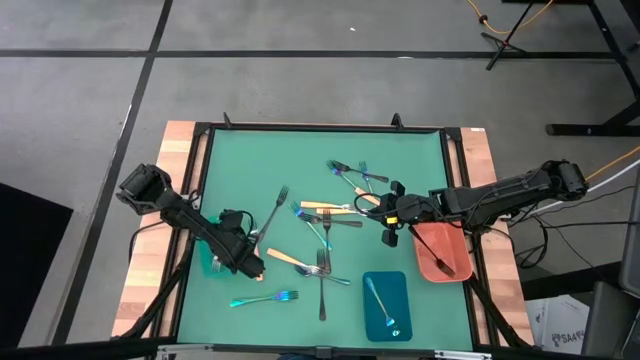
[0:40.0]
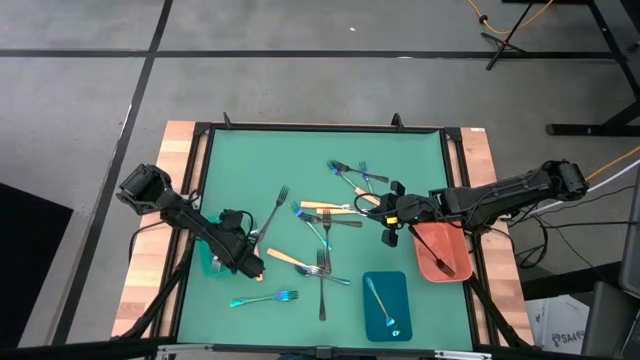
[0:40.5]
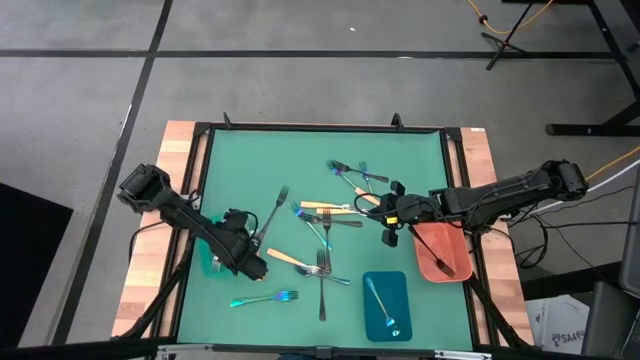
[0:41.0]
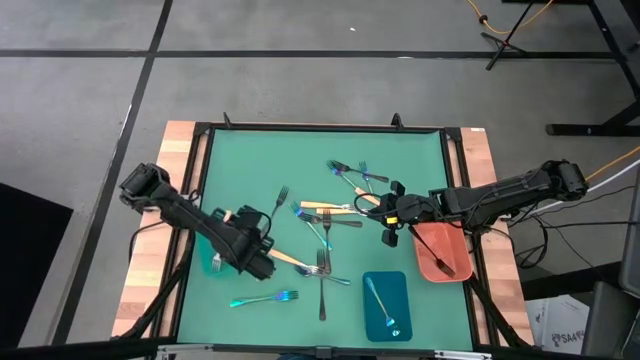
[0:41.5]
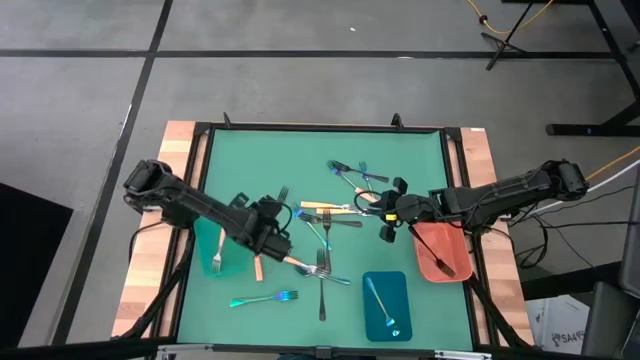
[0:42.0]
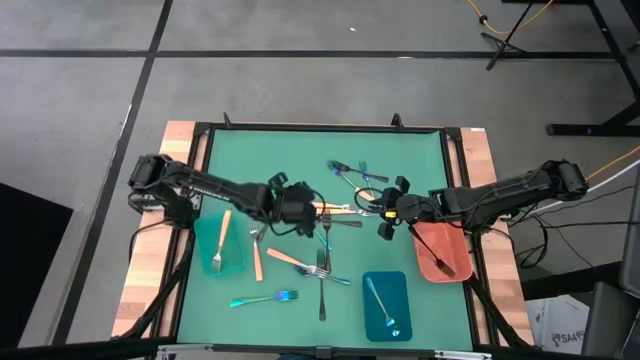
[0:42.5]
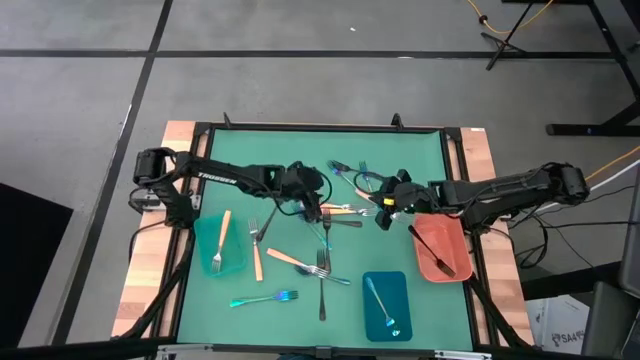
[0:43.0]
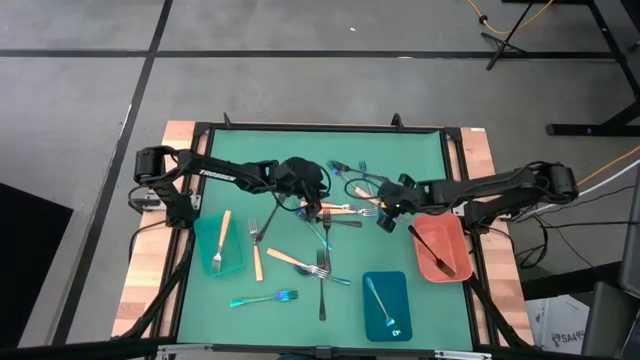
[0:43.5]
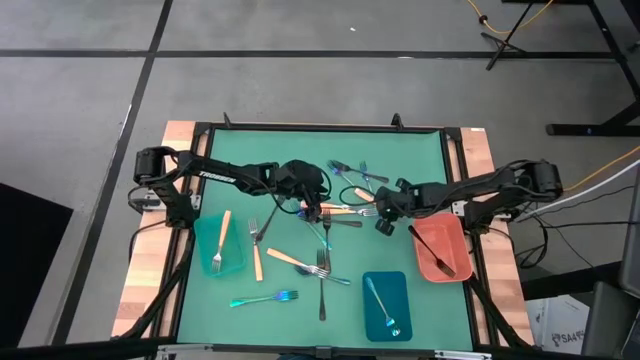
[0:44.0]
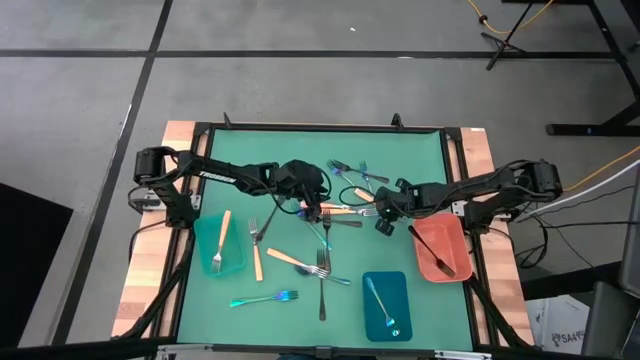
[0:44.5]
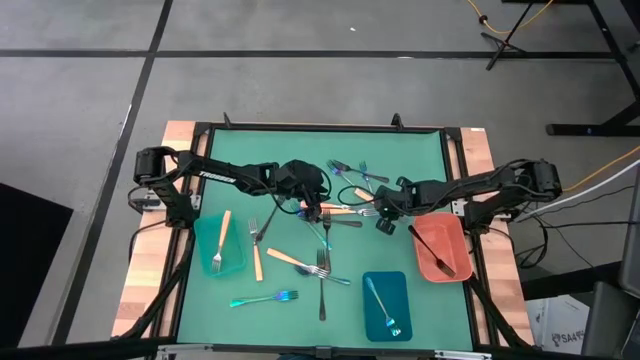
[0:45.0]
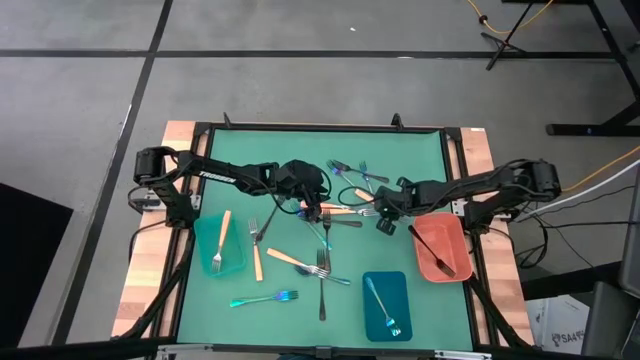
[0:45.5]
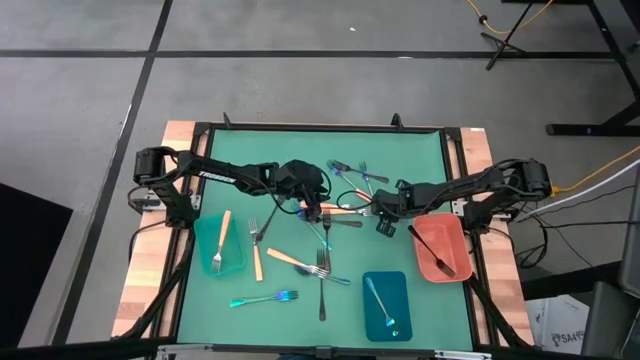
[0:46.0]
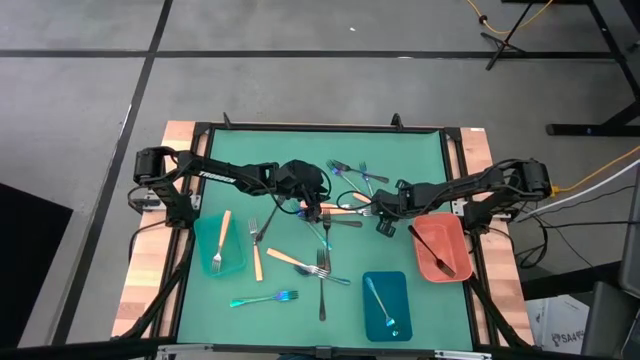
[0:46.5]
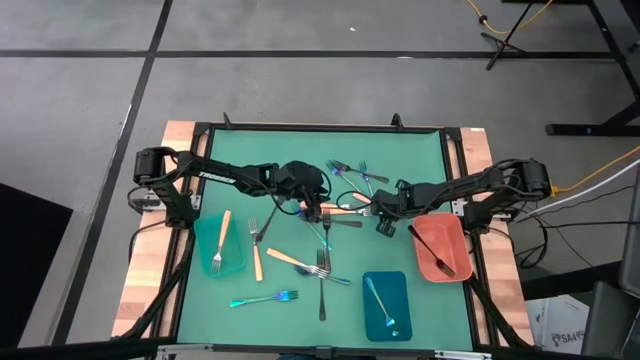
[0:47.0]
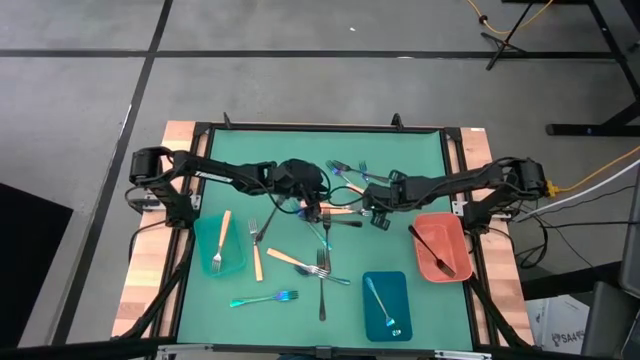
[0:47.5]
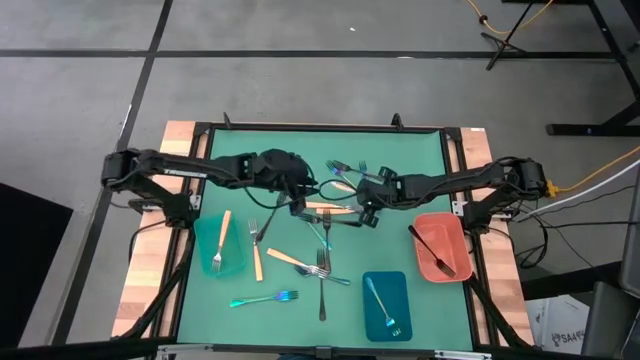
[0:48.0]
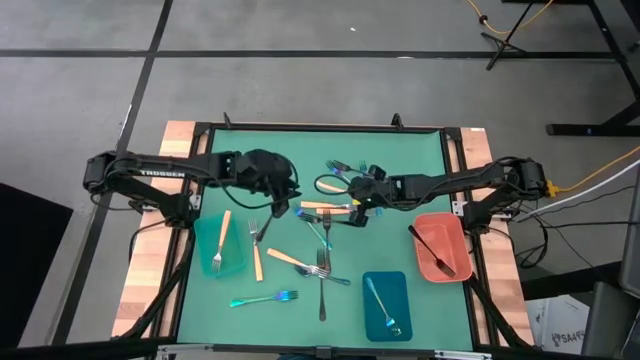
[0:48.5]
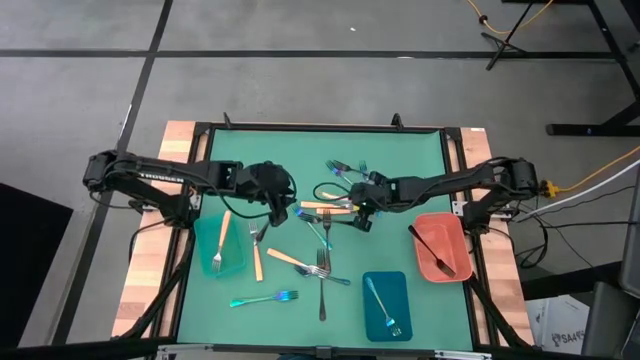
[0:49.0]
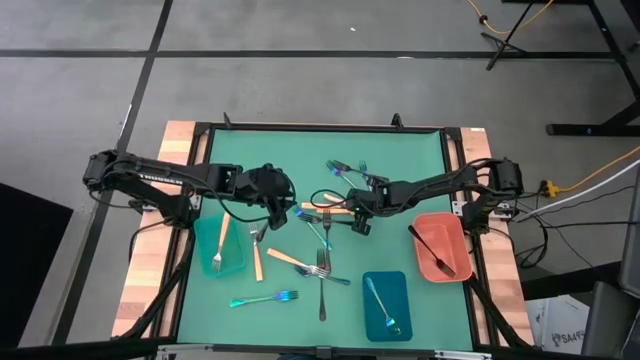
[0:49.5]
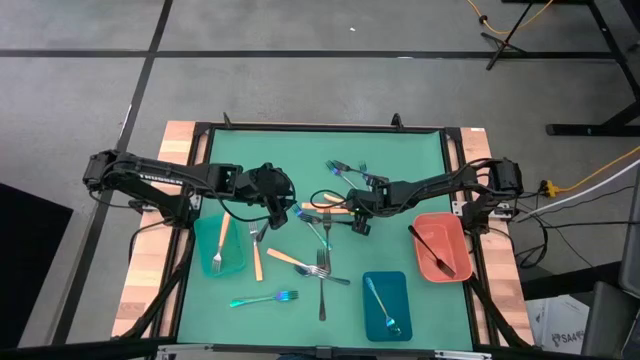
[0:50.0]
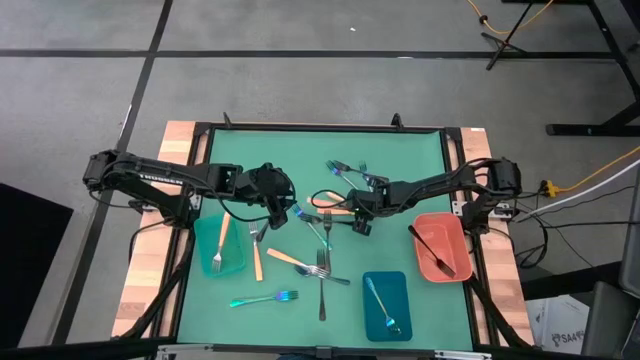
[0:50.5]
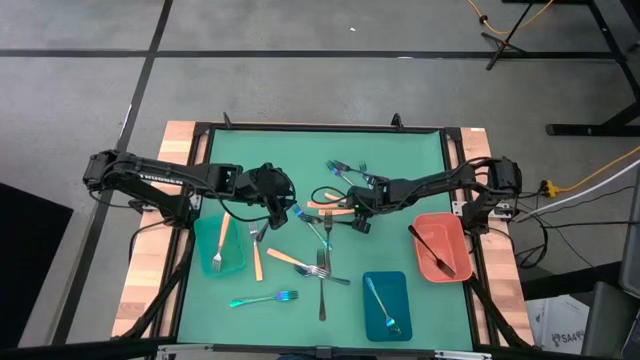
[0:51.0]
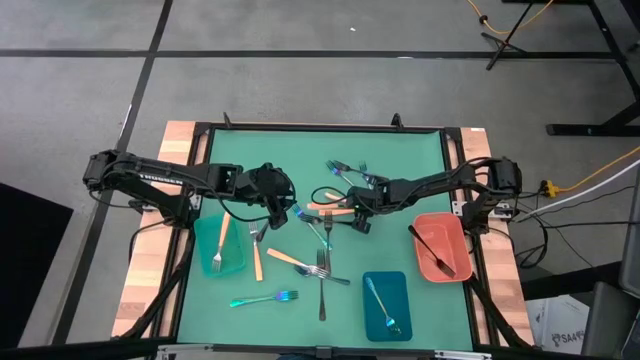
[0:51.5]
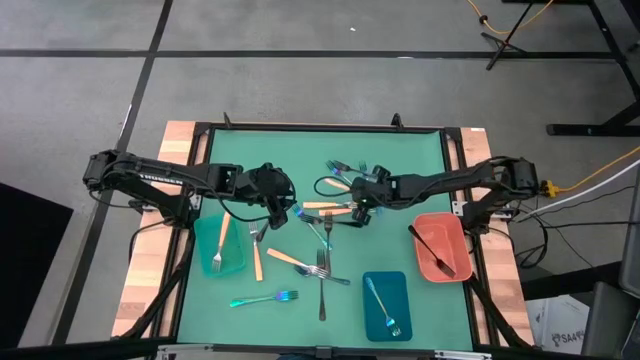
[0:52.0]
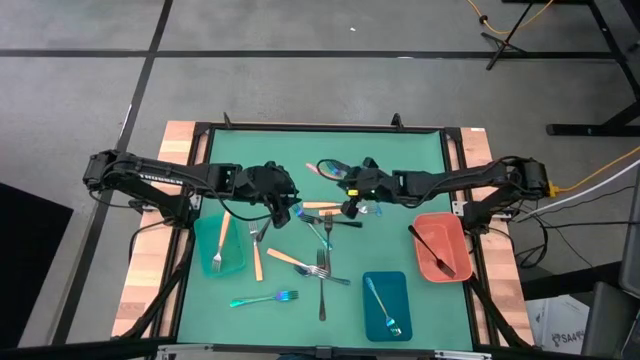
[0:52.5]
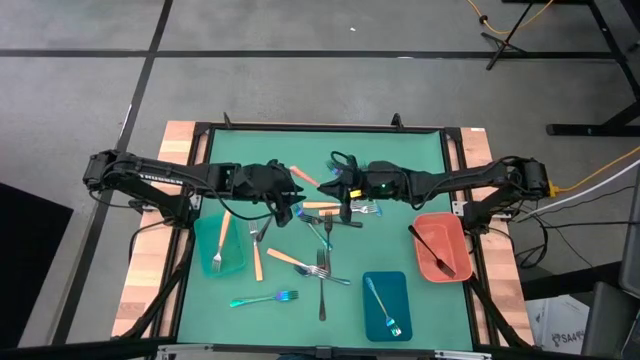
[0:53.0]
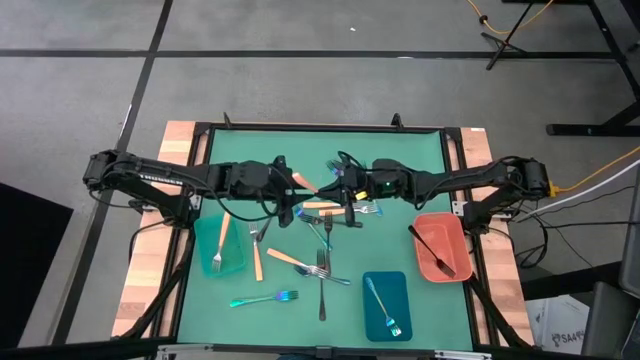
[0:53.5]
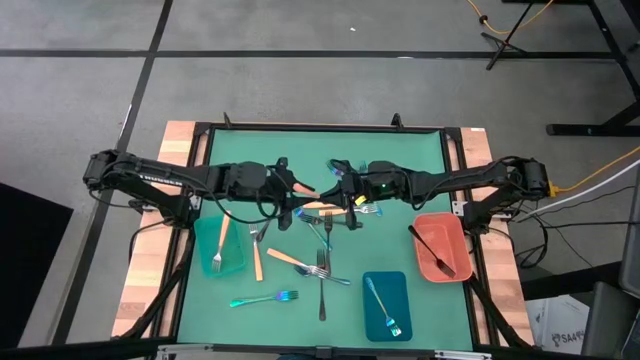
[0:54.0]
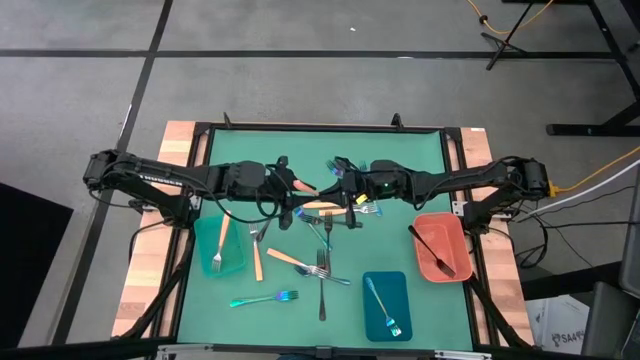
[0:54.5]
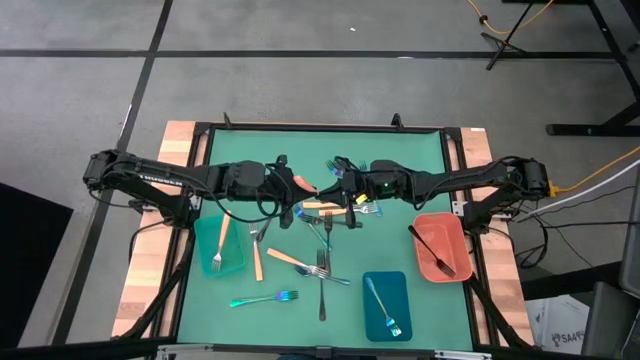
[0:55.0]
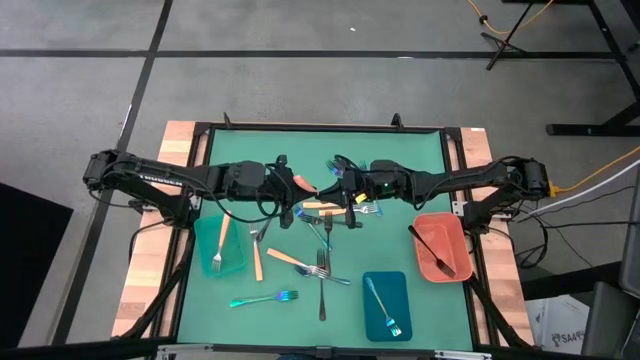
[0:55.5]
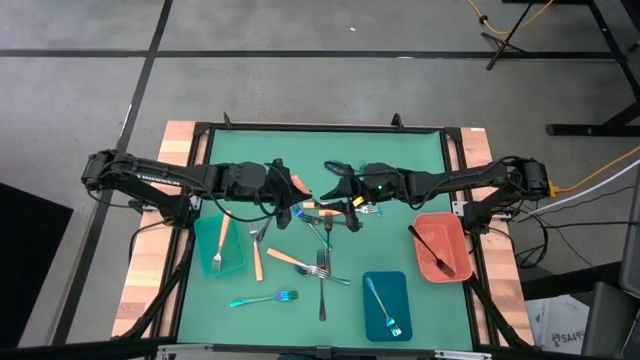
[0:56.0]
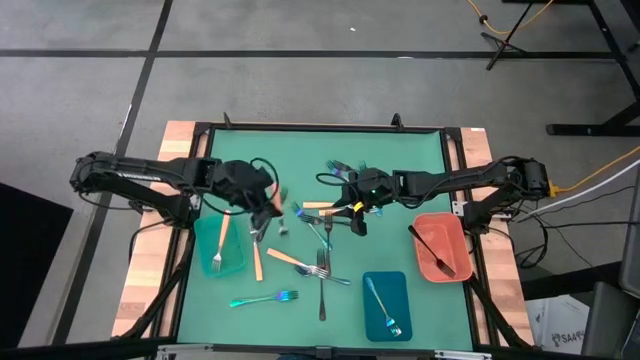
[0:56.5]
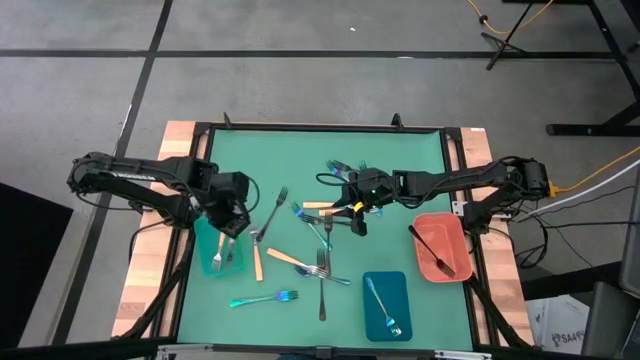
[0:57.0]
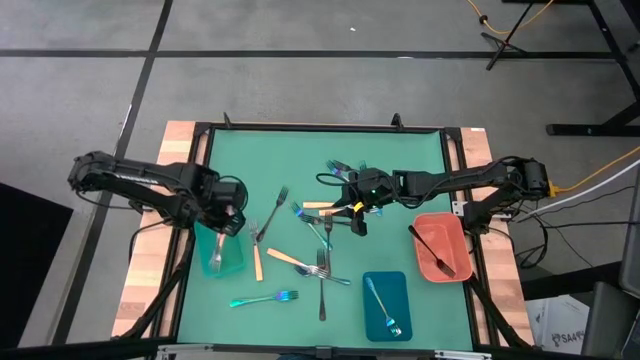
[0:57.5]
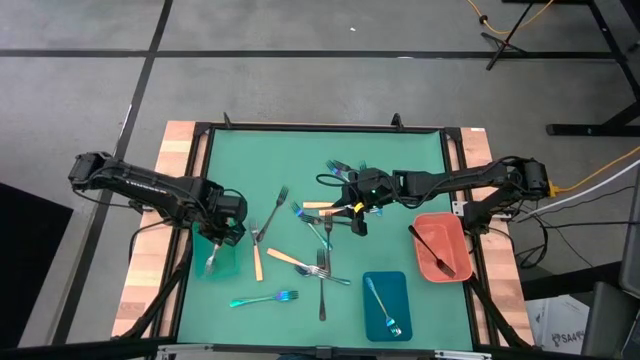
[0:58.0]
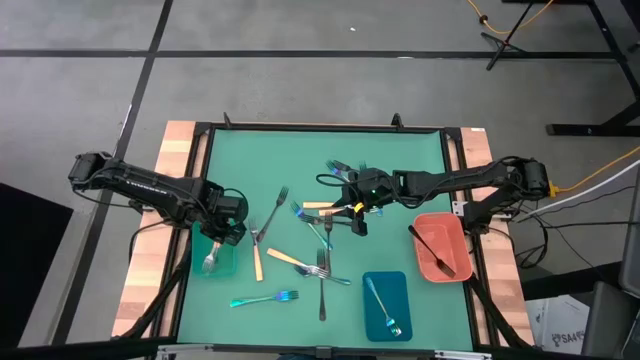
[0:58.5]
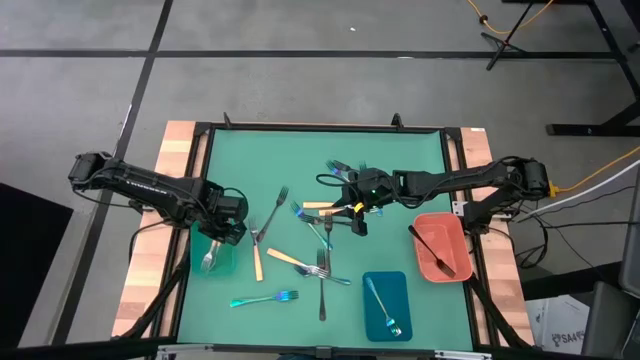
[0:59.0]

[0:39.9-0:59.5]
Task: Sort silverware by color (type)
Put the yellow fork into the green bin
